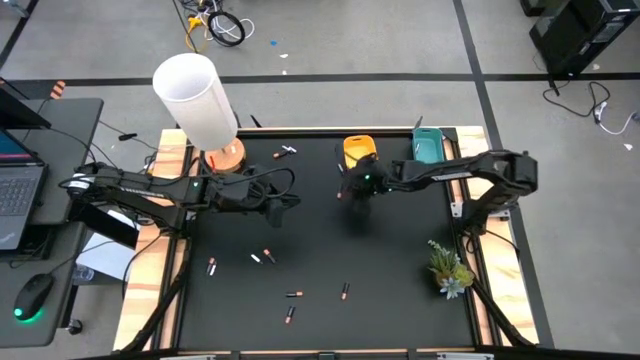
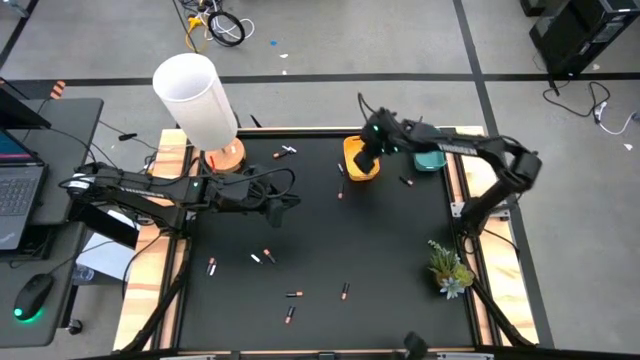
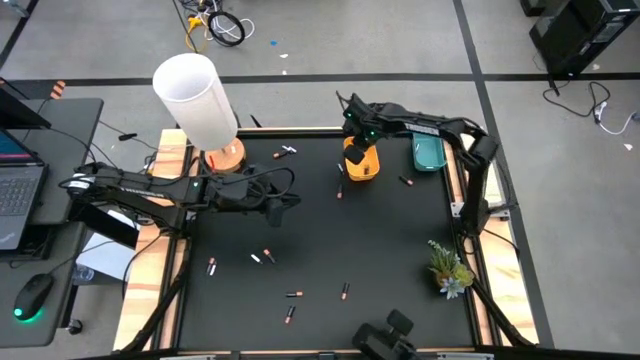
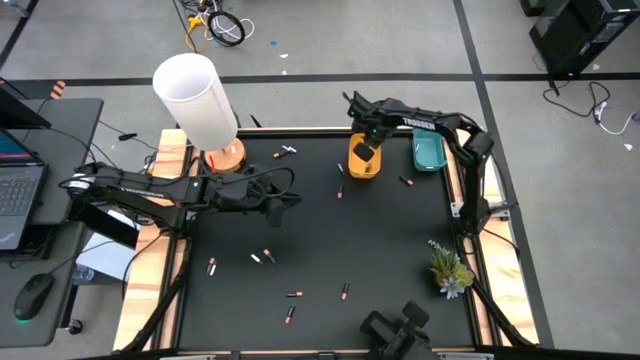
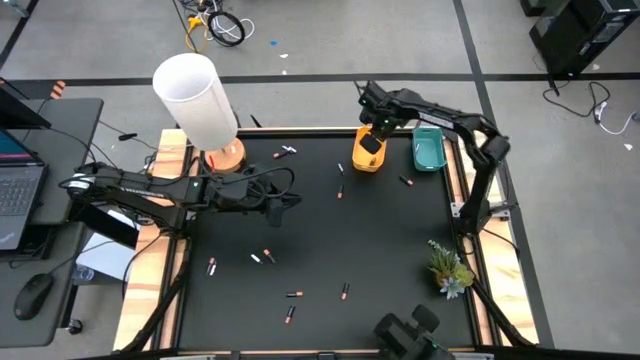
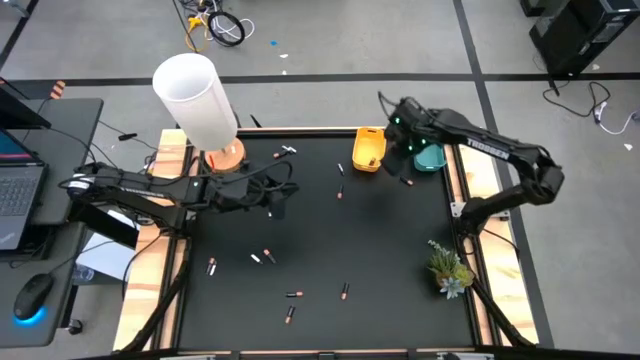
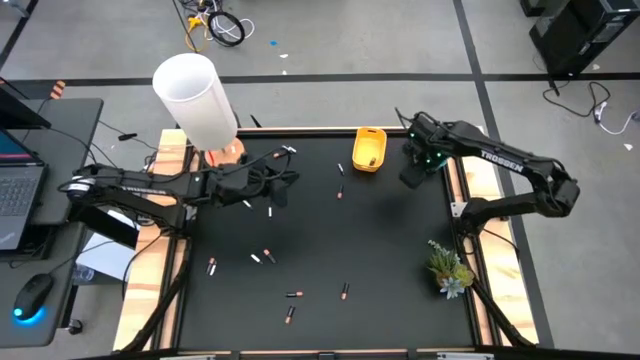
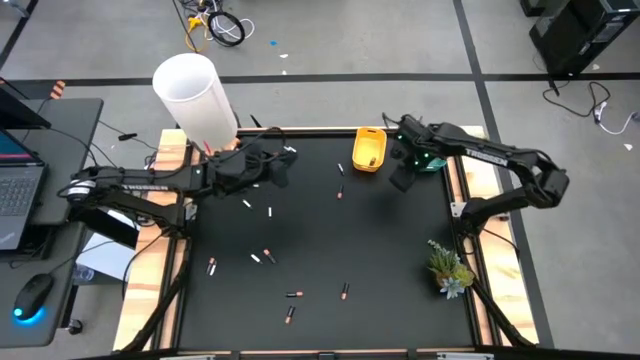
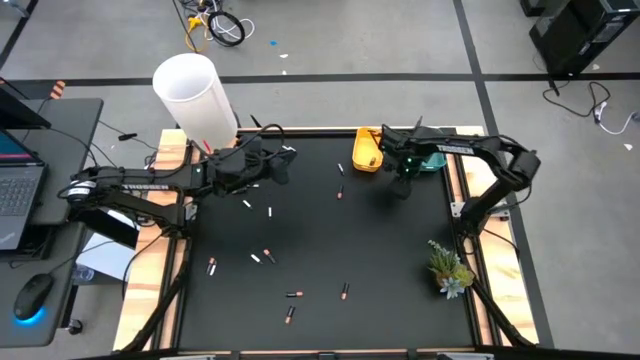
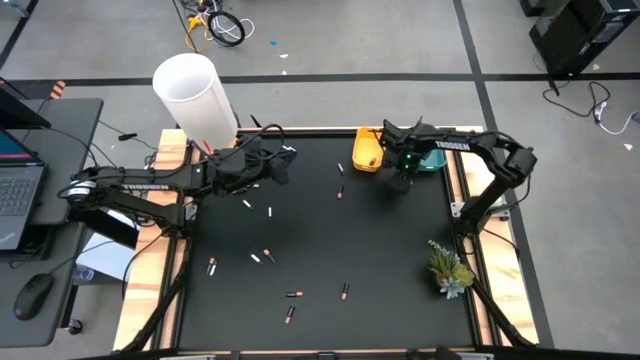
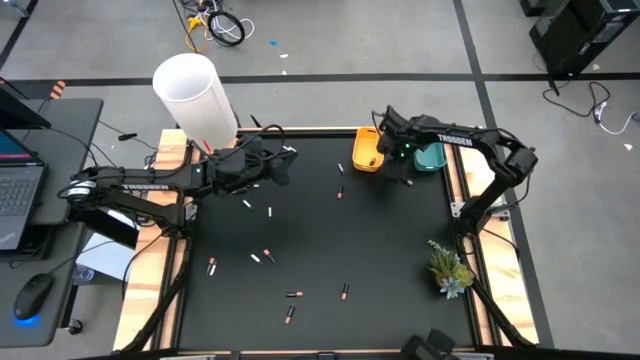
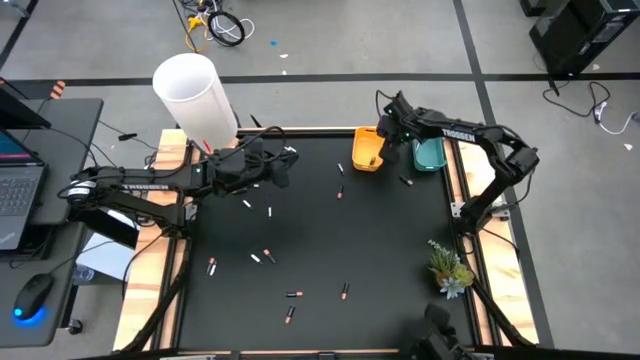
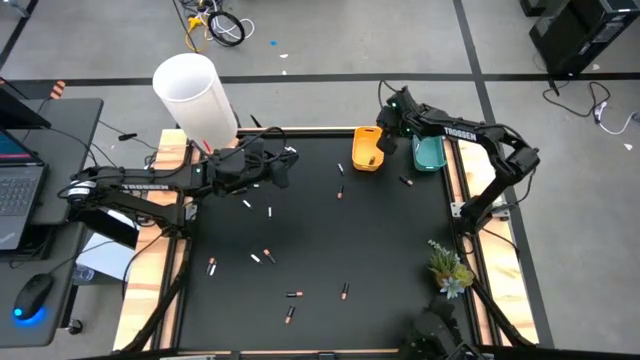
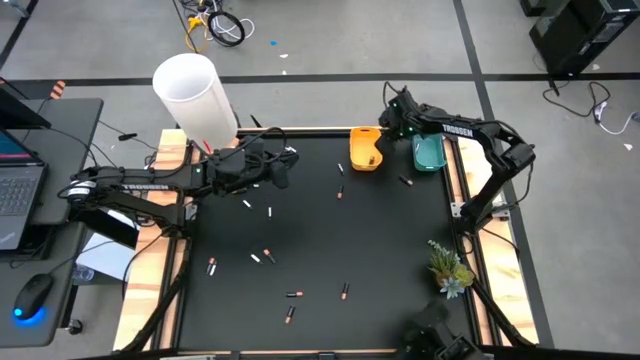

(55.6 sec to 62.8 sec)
Task: Sort batteries
Adjust the yellow bin on the table

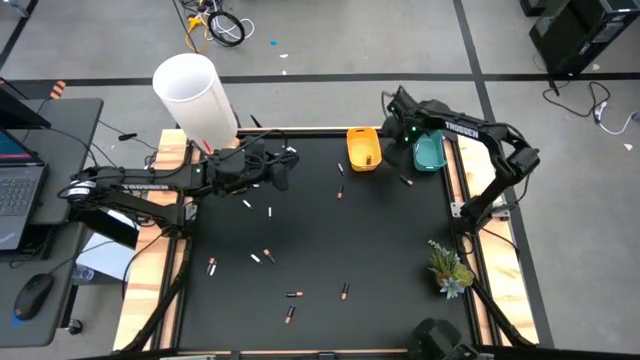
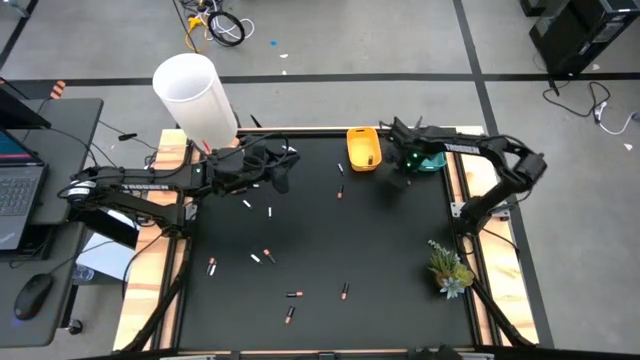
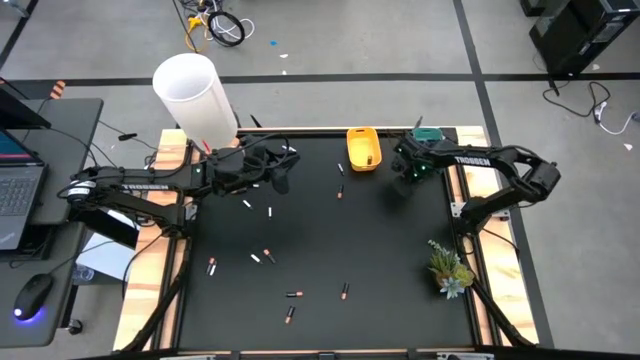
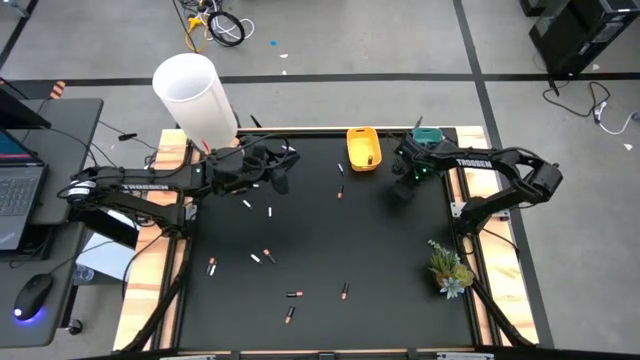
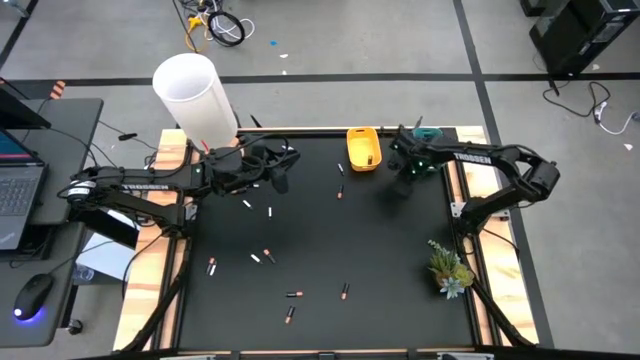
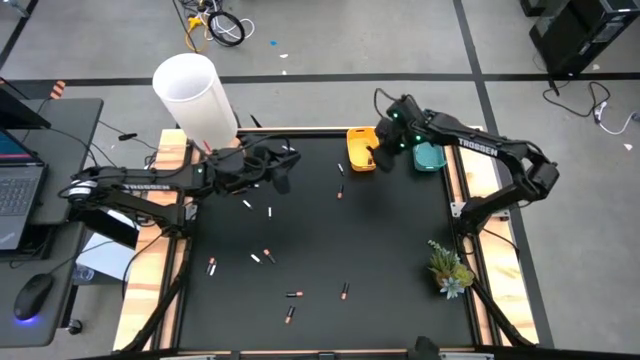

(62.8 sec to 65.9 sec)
Put the black battery into the yellow bin

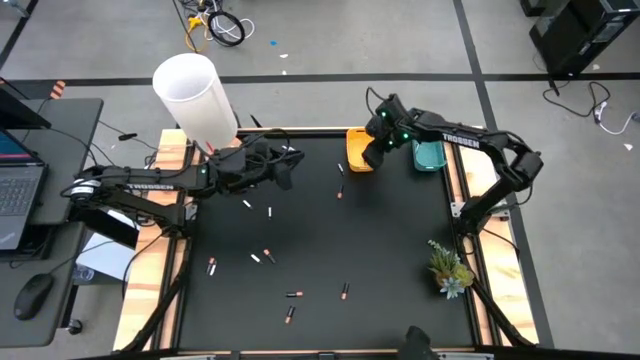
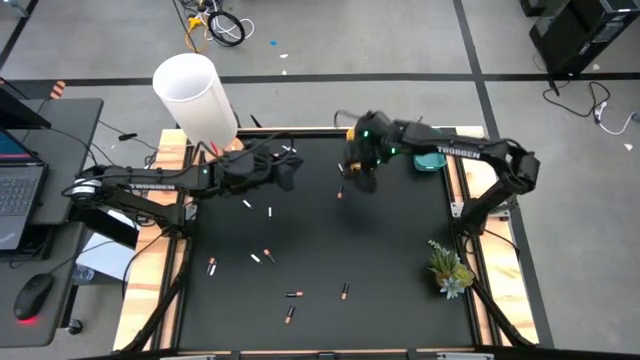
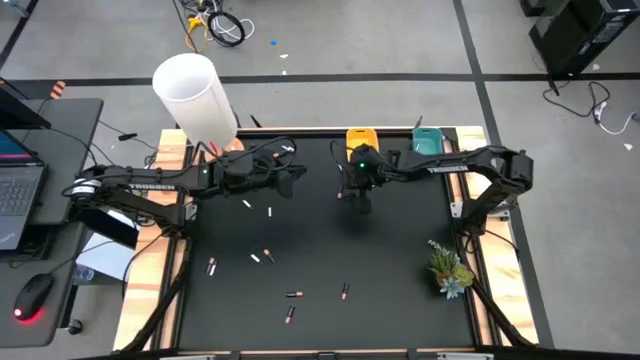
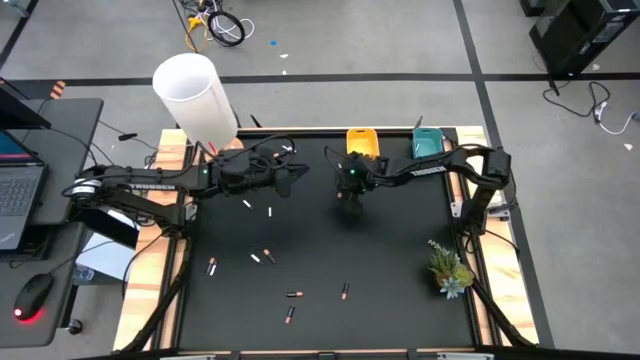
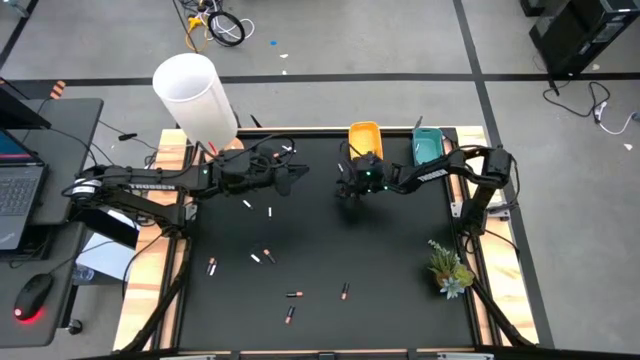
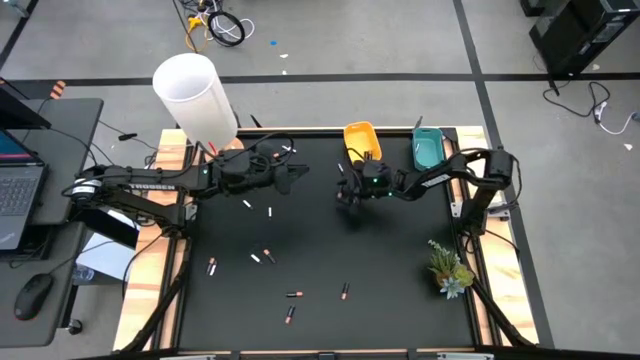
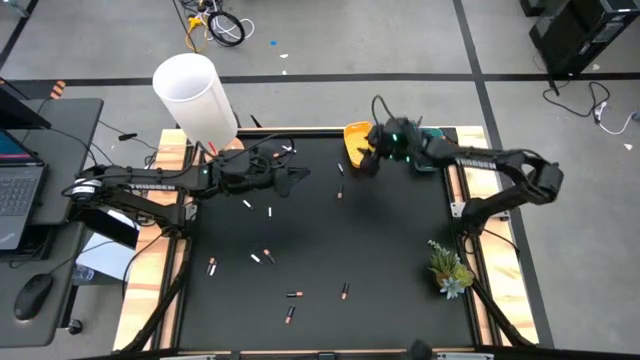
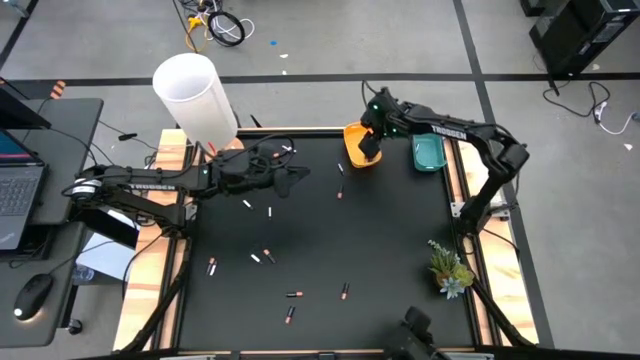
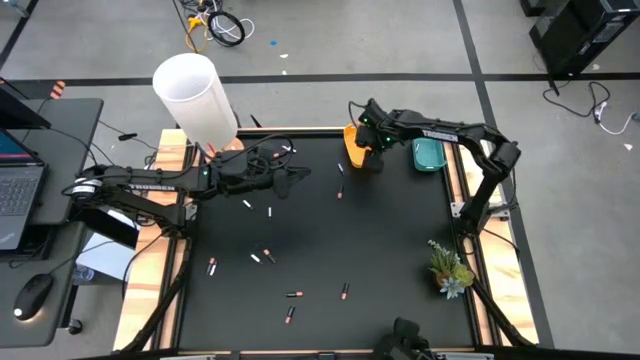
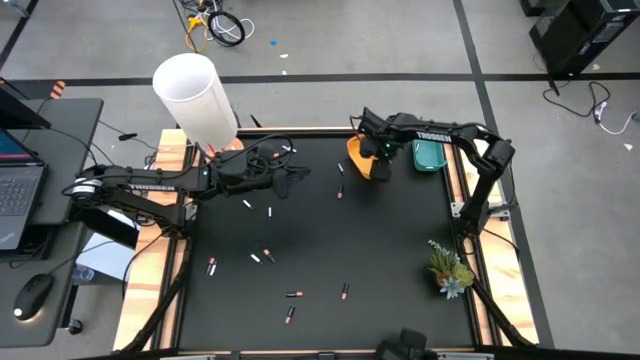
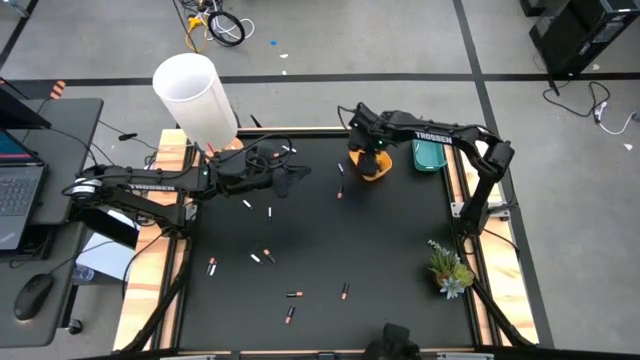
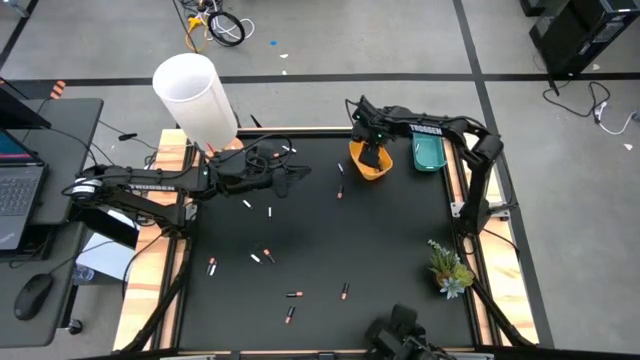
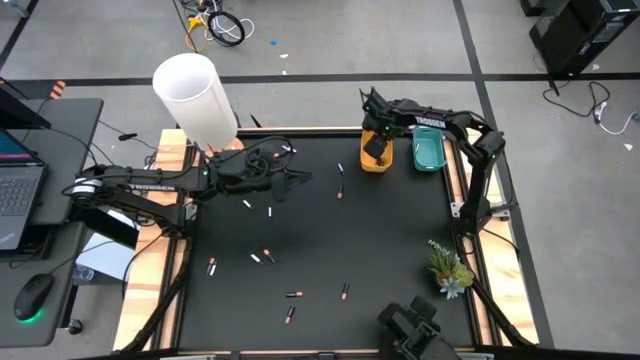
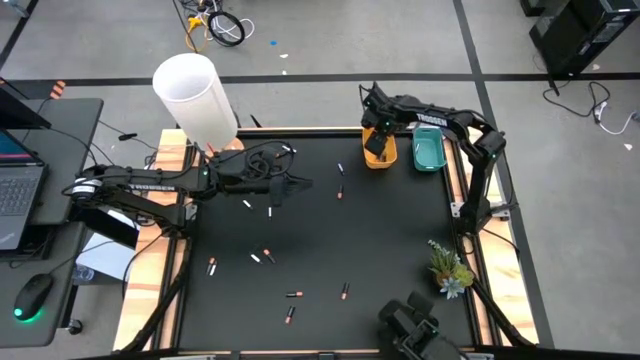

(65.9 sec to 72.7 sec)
Adjust the yellow bin on the table

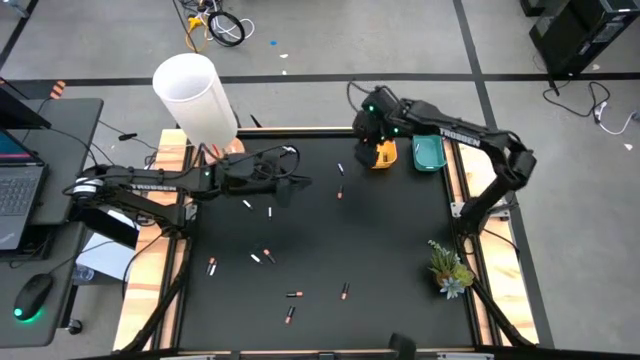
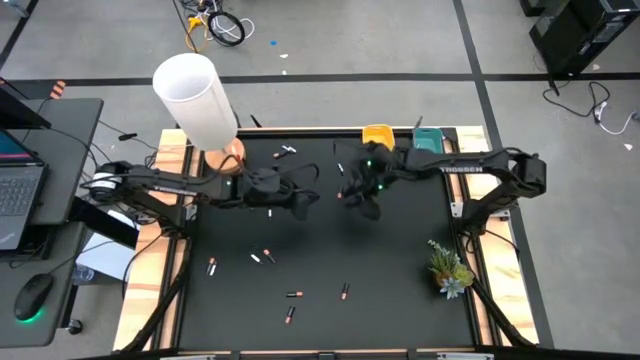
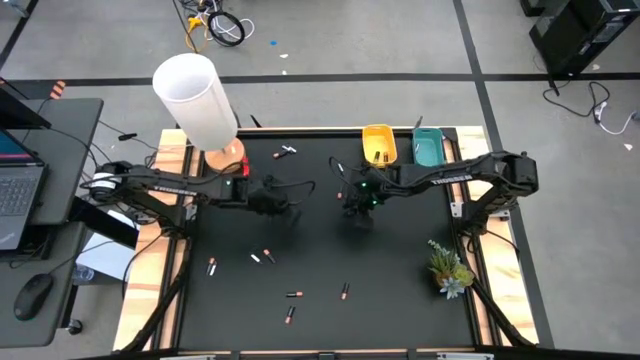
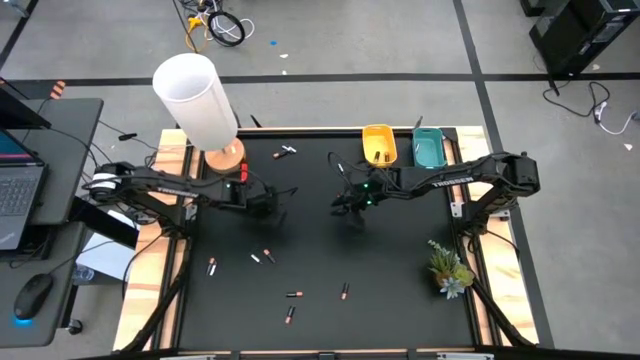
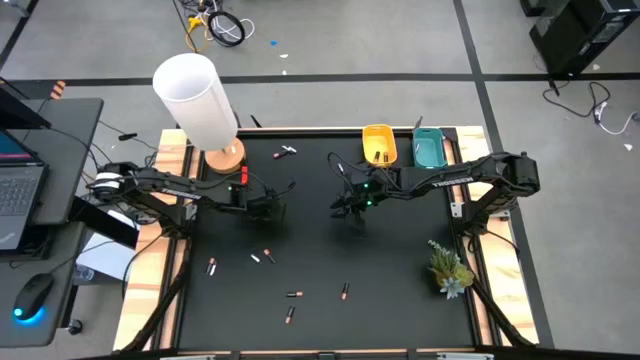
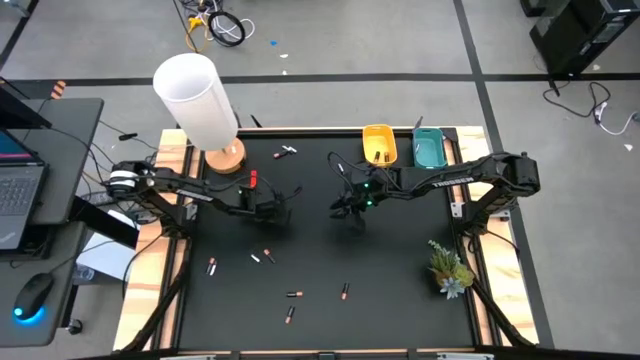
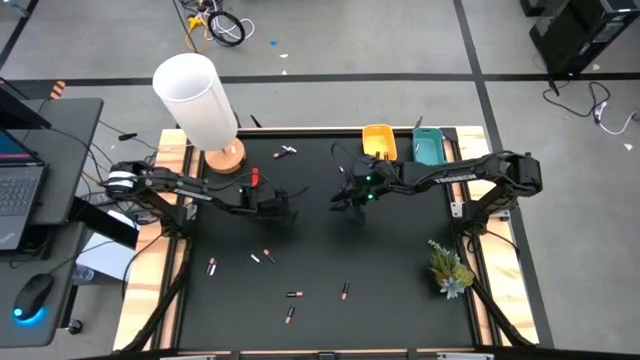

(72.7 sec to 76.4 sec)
Put the silver battery into the blue bin
